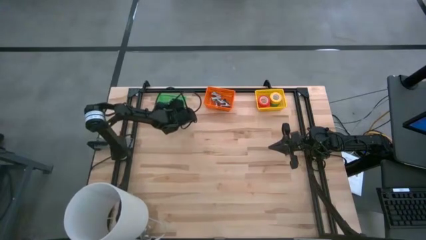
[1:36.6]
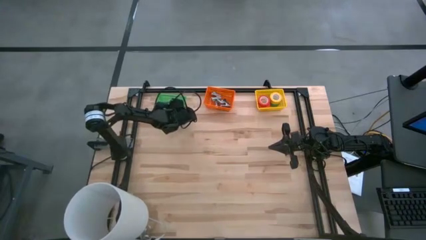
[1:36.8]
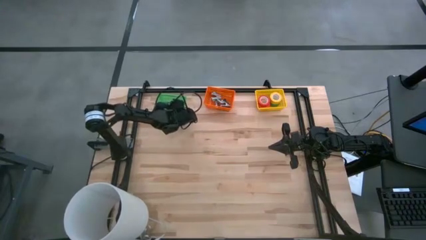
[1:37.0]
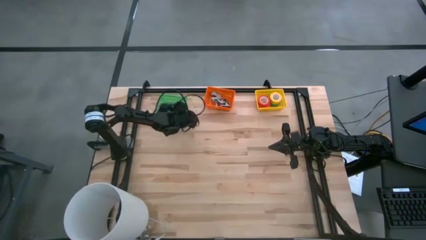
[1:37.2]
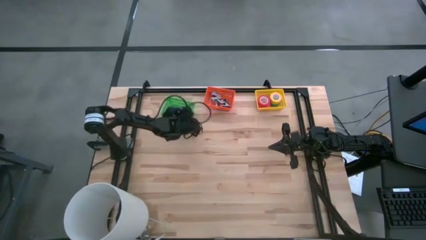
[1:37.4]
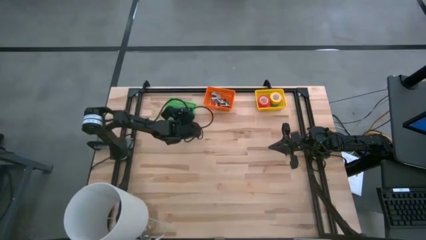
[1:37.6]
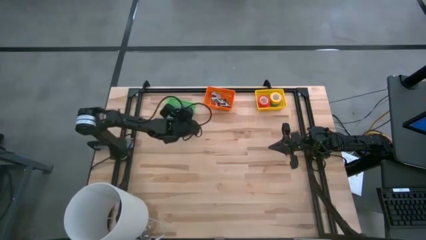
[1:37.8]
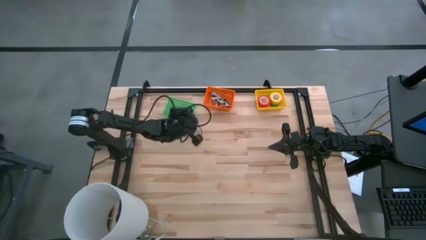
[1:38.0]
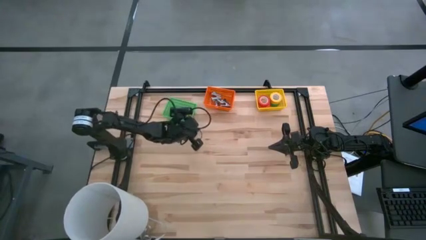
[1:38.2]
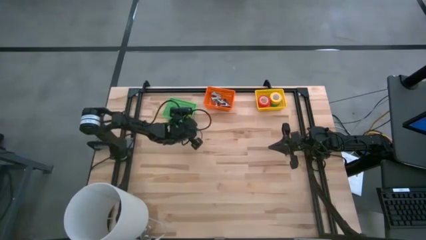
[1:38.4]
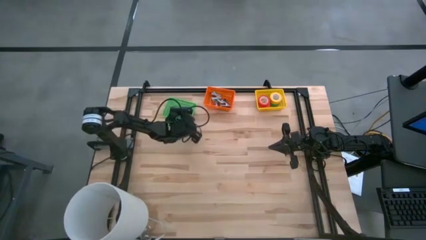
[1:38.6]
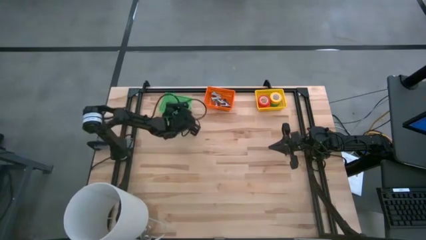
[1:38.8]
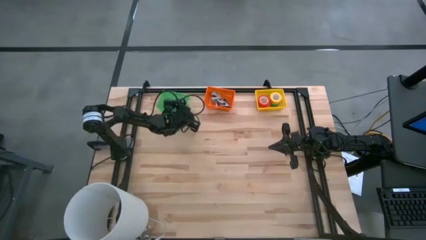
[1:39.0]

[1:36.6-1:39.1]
Task: Pick and place Stapler, Stapler remover, tape
Adjust the green bin

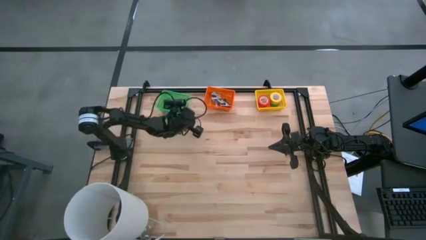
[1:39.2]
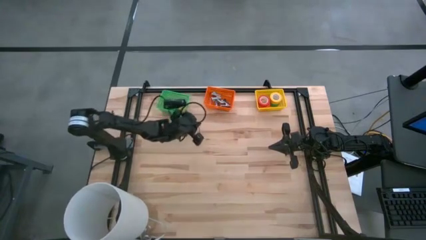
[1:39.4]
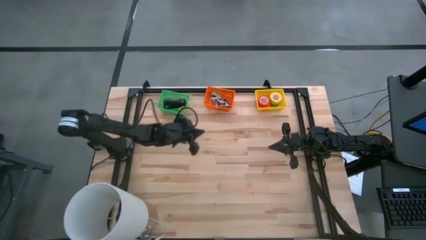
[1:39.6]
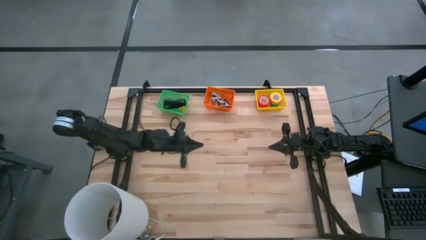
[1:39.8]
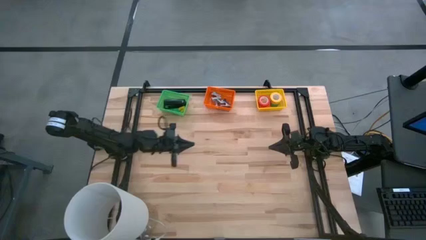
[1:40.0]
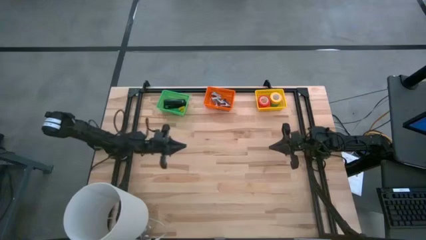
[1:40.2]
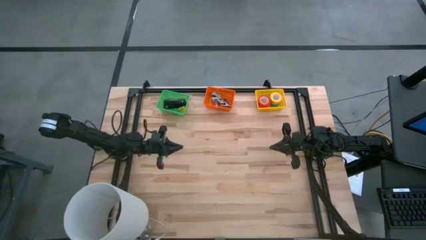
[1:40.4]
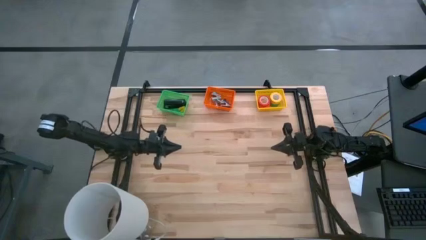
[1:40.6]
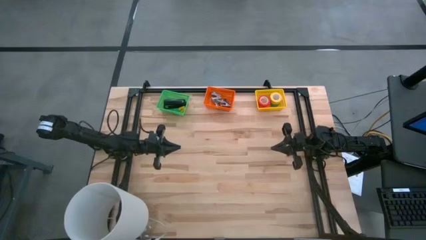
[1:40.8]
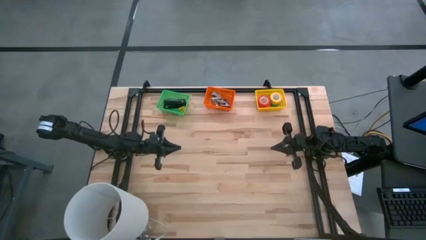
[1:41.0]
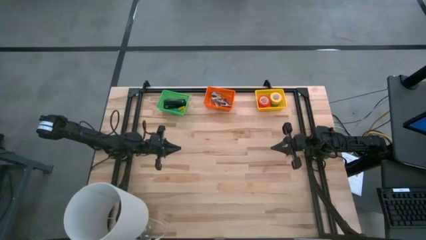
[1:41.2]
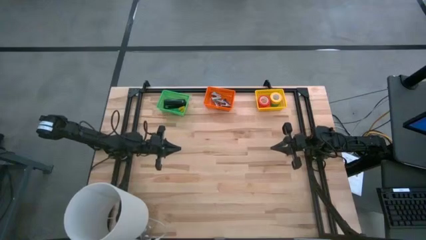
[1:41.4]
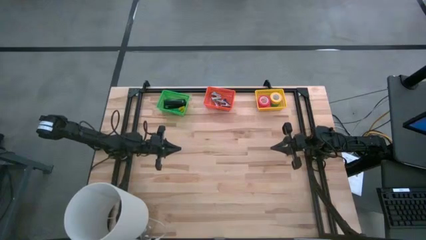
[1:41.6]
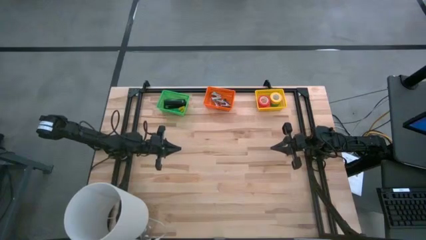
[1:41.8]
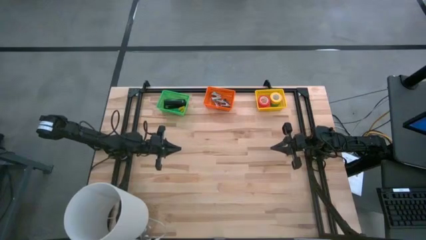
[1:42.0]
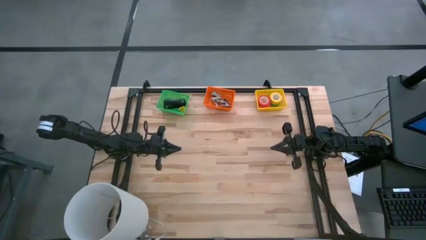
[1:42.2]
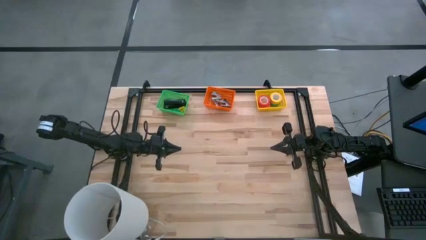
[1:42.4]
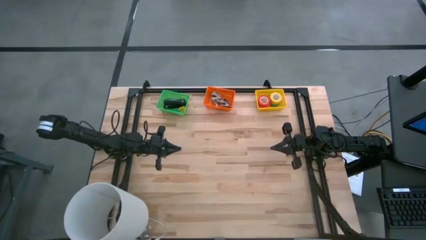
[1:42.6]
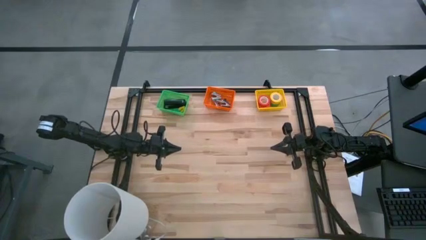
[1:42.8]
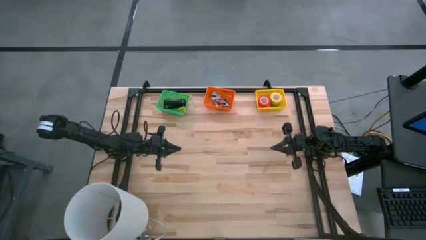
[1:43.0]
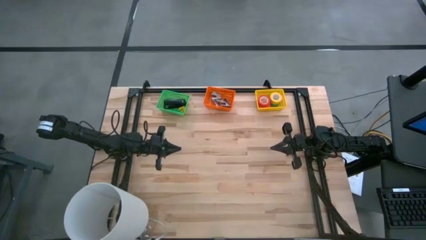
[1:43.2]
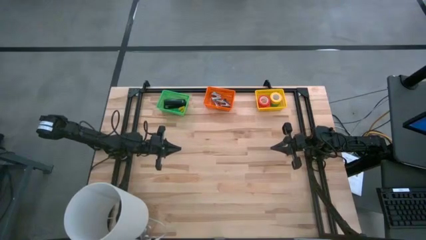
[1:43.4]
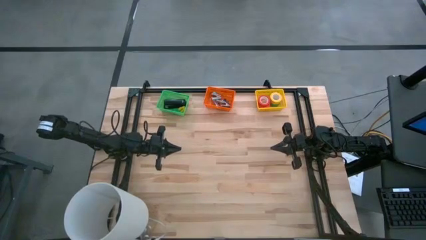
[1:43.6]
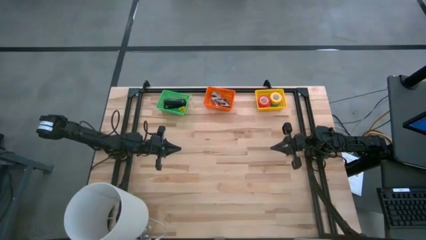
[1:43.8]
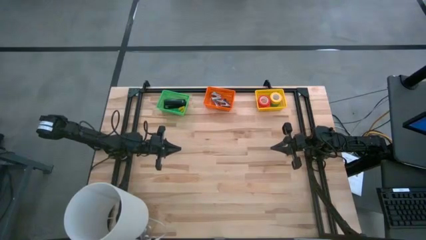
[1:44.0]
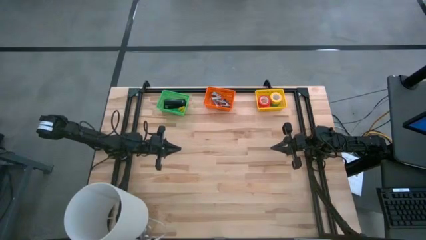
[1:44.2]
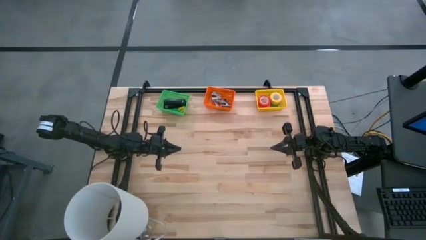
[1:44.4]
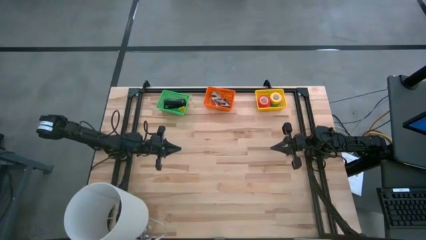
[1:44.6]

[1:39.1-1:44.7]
Return to Home Position

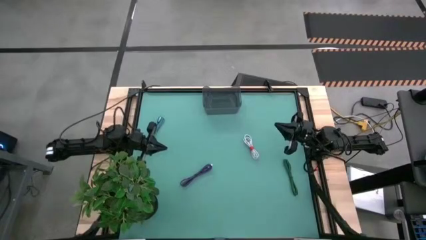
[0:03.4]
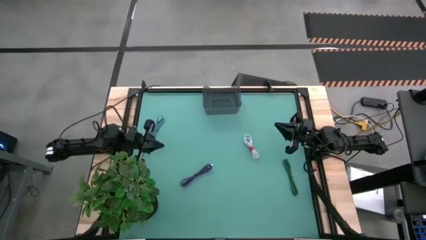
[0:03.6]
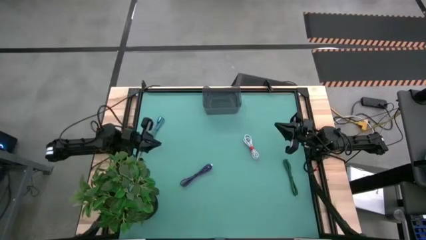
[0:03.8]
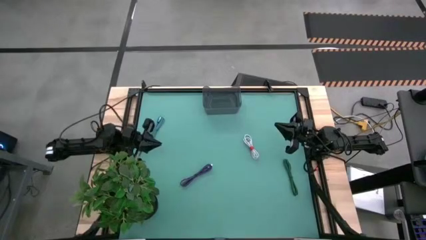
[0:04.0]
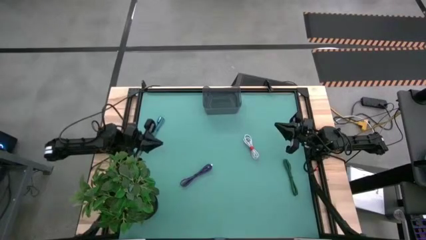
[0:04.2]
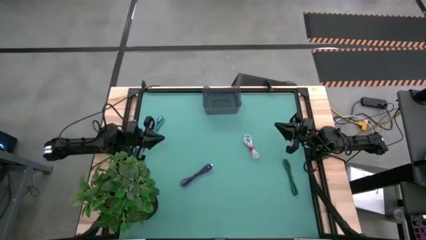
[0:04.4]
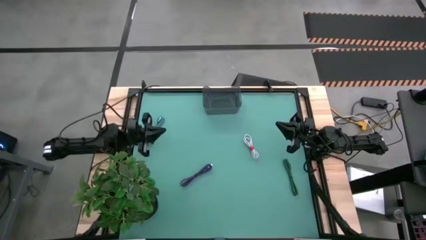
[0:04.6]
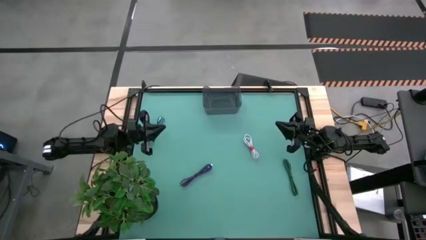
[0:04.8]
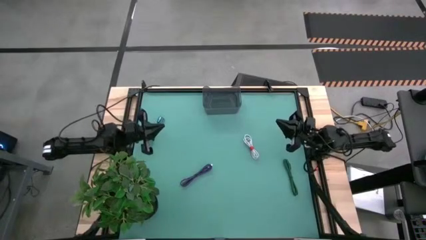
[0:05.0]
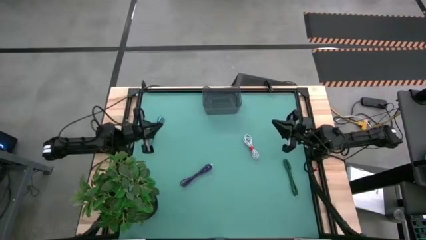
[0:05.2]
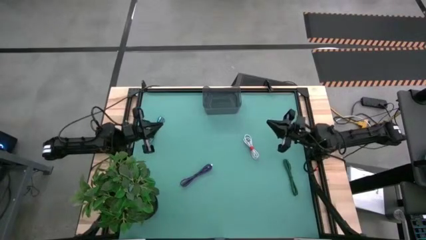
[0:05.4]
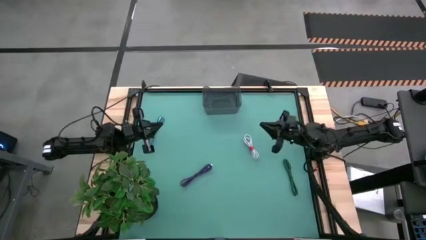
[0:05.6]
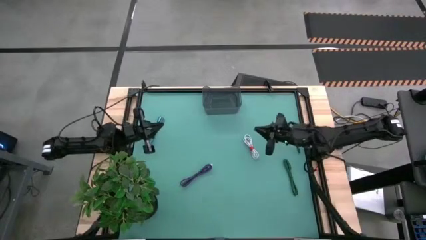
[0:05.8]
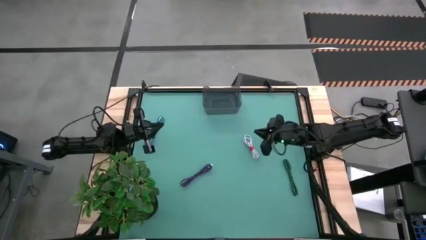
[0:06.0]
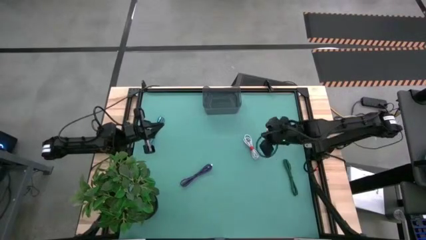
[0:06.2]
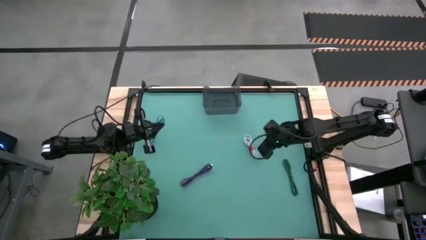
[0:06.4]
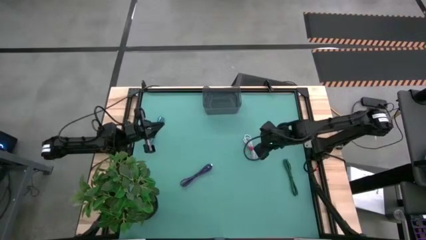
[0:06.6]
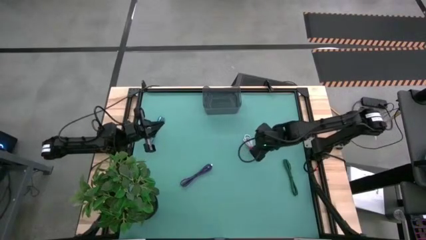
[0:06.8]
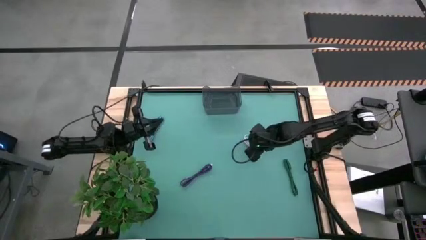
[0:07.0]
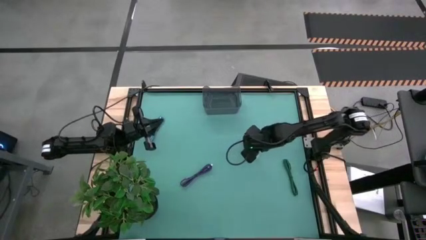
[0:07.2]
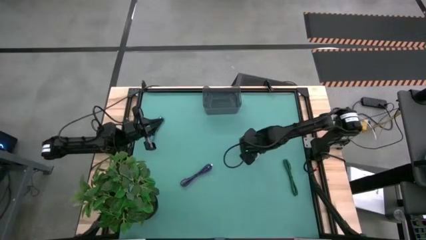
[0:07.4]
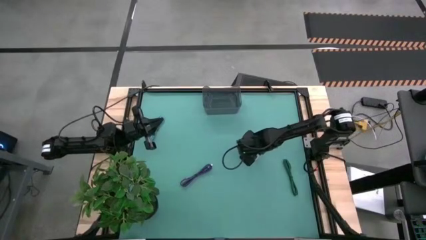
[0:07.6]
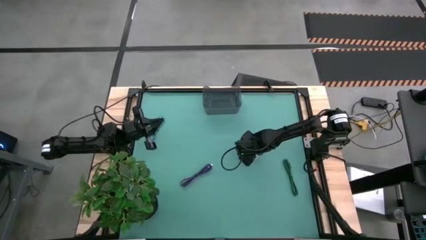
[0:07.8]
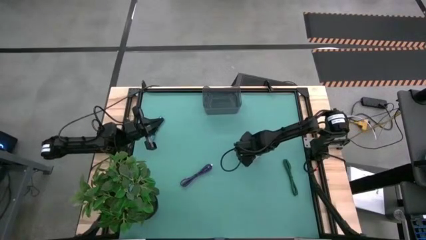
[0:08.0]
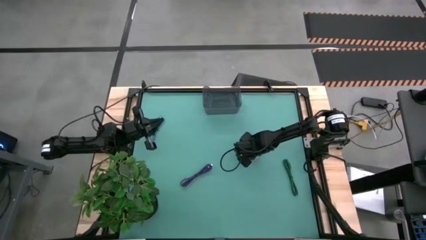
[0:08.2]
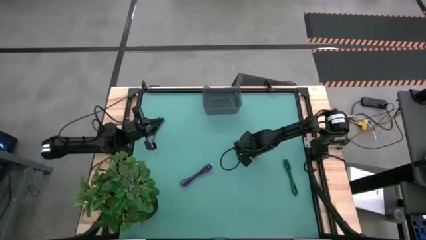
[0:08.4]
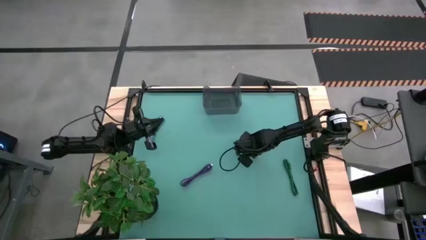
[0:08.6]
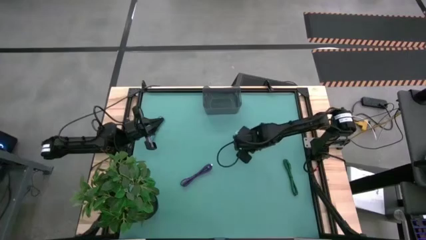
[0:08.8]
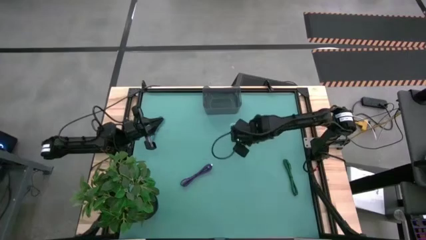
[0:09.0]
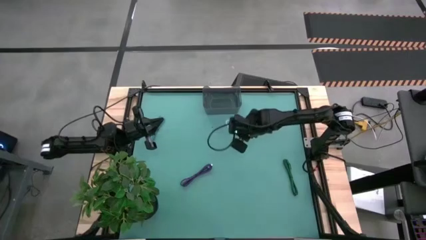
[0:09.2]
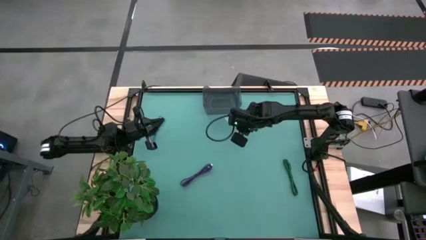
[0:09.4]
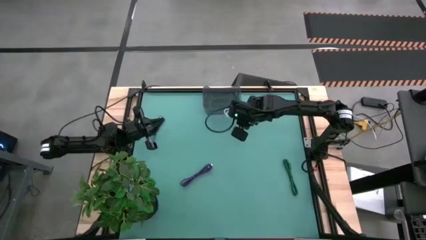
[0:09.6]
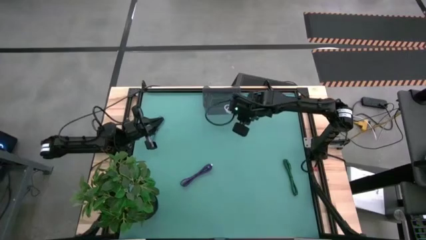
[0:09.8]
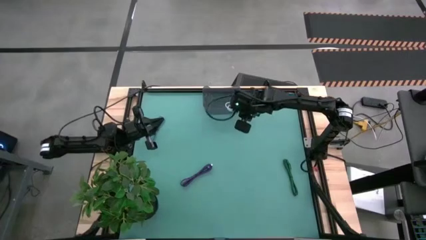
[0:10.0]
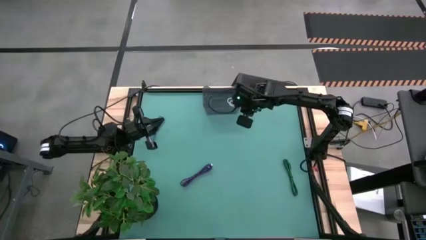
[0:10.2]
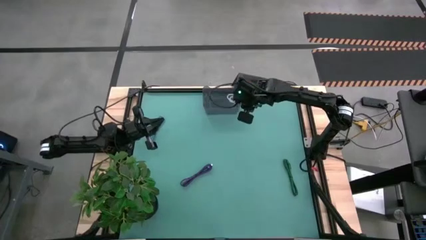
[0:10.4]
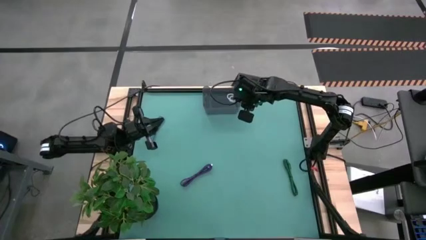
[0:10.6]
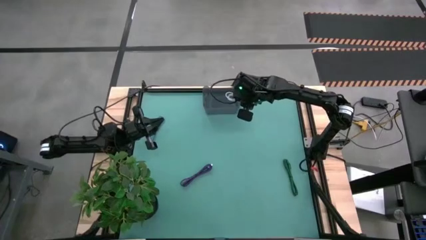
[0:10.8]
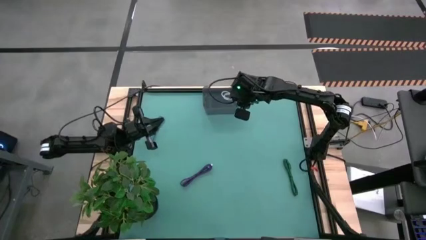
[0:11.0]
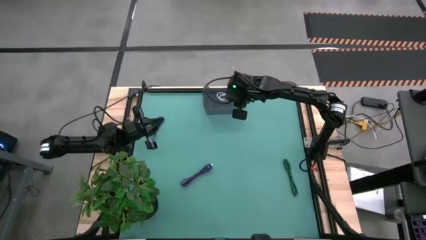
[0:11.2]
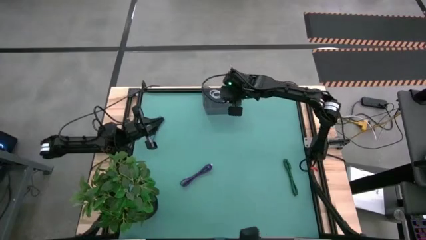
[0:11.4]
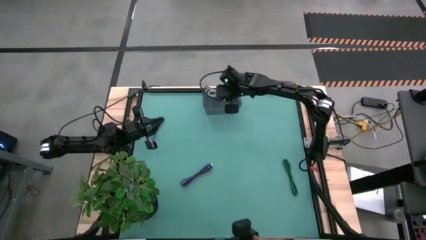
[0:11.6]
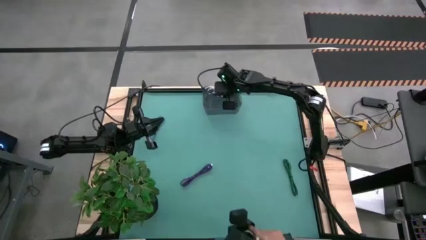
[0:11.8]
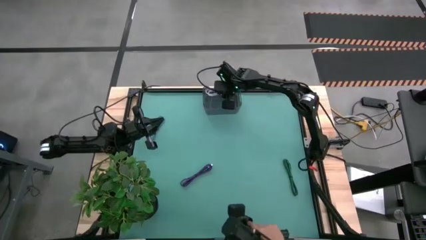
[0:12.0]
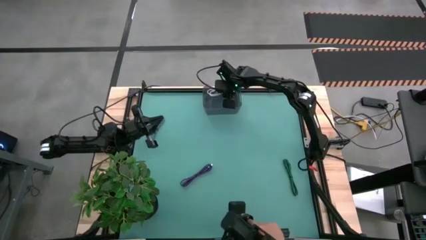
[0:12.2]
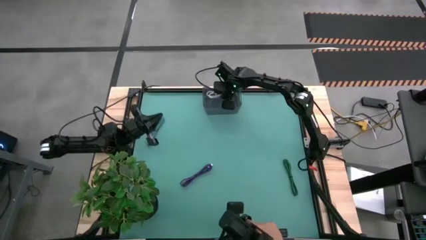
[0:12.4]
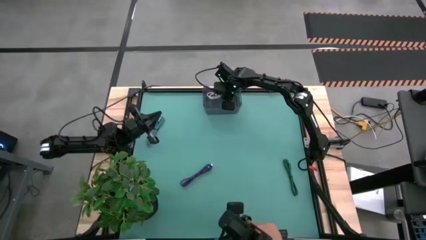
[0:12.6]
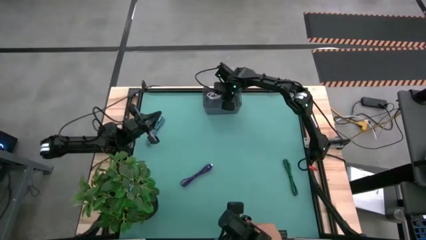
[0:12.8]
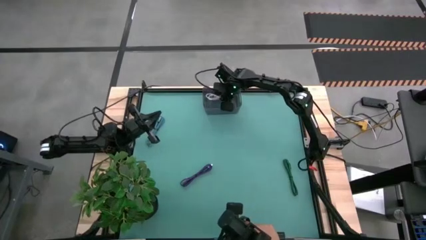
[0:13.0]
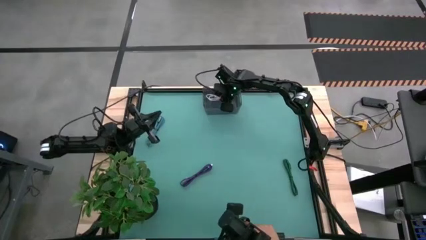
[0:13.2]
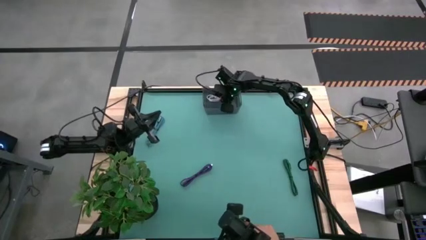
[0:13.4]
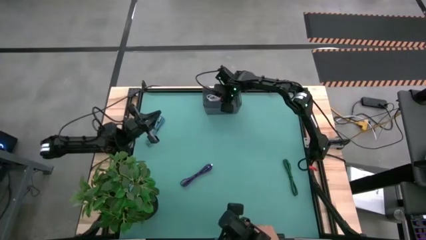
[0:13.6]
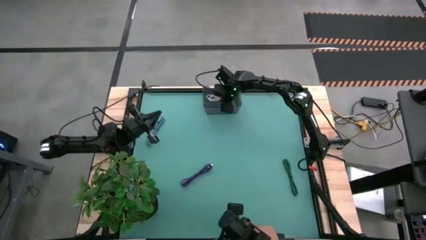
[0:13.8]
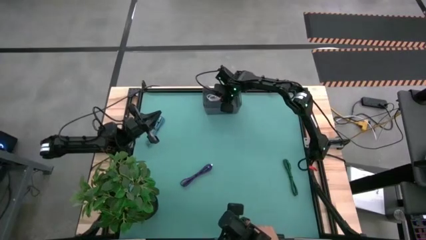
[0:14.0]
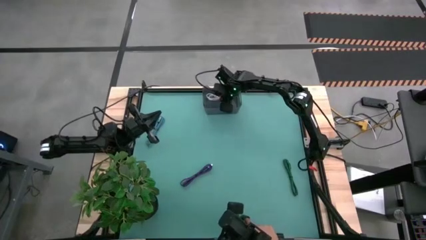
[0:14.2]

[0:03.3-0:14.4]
Task: Pick and place USB-C Cables
Put the white charger cable into the black container
